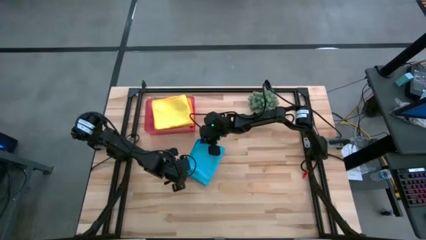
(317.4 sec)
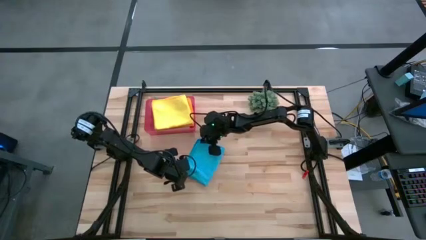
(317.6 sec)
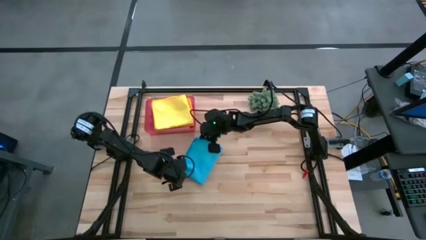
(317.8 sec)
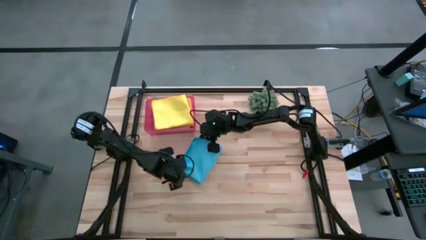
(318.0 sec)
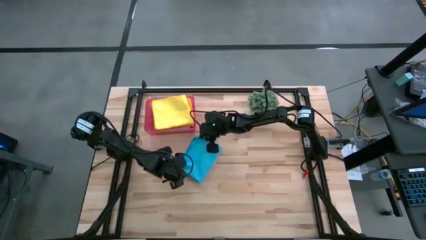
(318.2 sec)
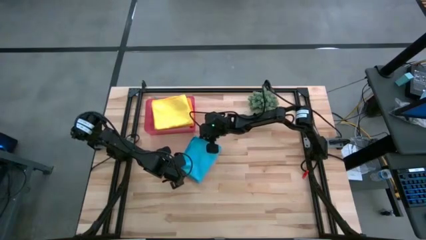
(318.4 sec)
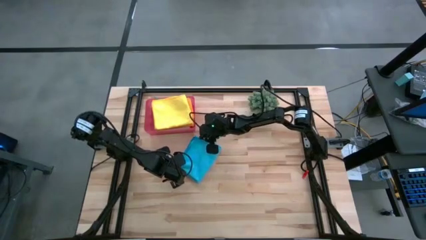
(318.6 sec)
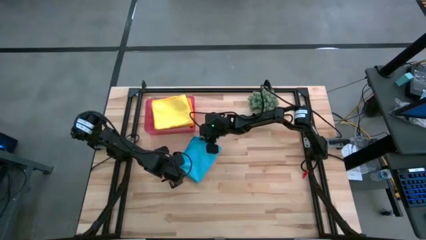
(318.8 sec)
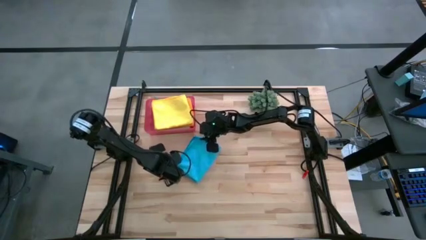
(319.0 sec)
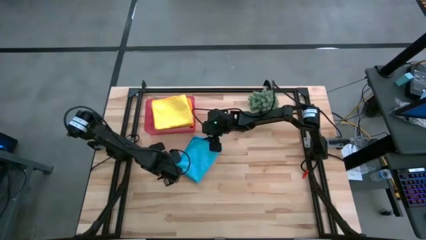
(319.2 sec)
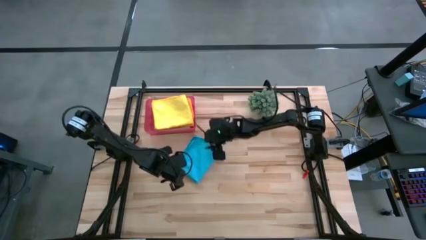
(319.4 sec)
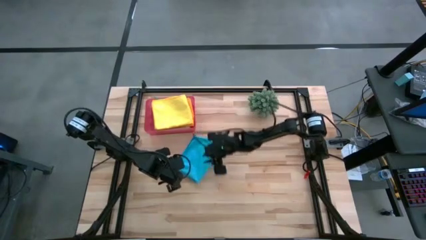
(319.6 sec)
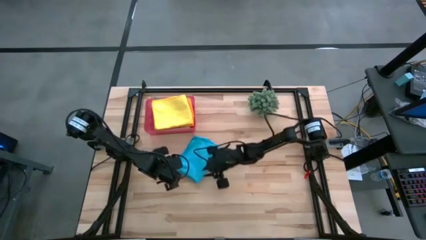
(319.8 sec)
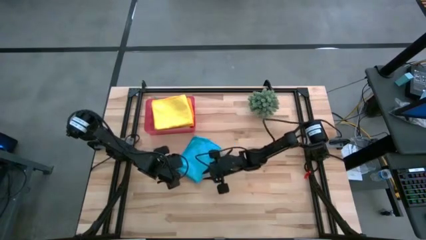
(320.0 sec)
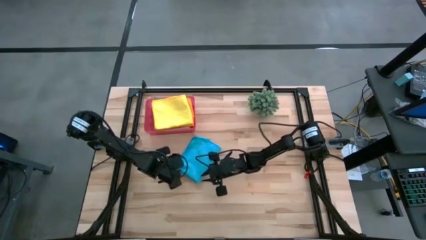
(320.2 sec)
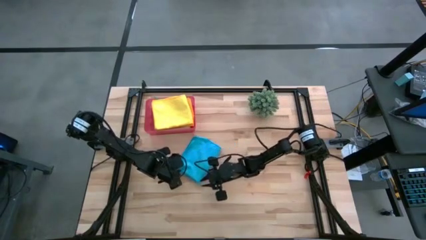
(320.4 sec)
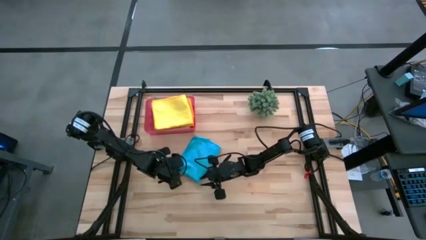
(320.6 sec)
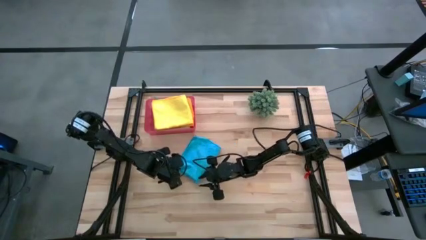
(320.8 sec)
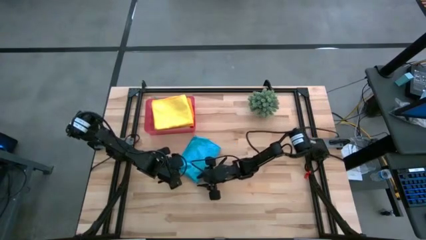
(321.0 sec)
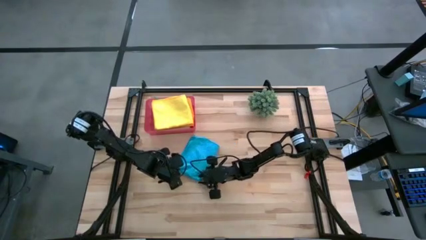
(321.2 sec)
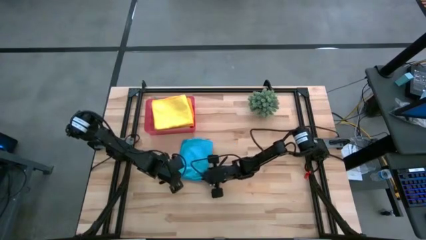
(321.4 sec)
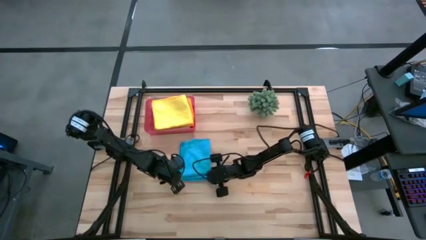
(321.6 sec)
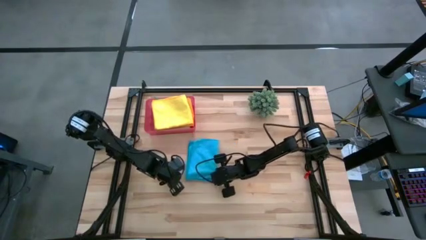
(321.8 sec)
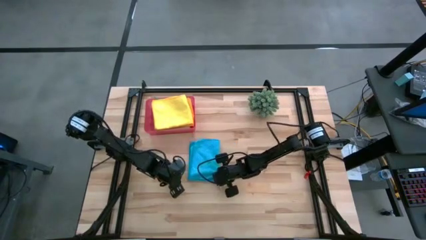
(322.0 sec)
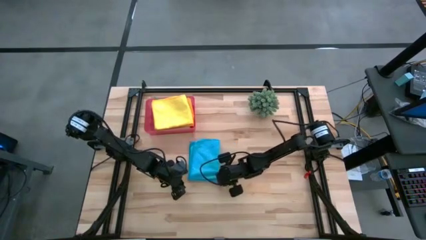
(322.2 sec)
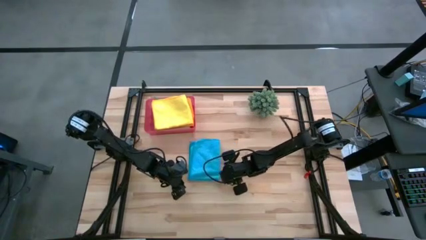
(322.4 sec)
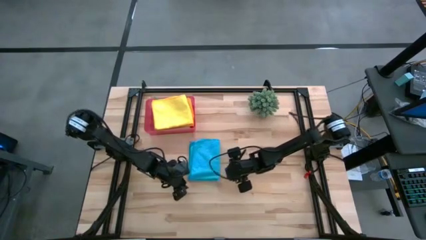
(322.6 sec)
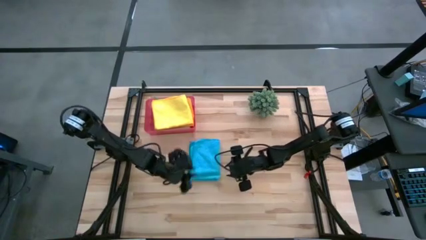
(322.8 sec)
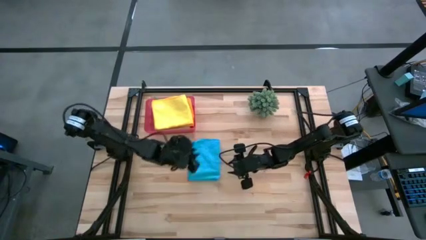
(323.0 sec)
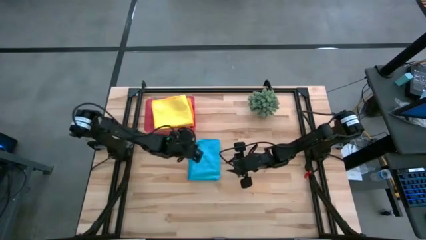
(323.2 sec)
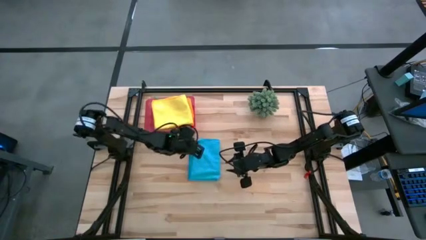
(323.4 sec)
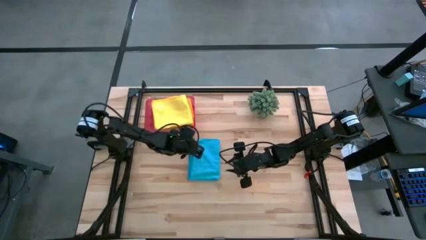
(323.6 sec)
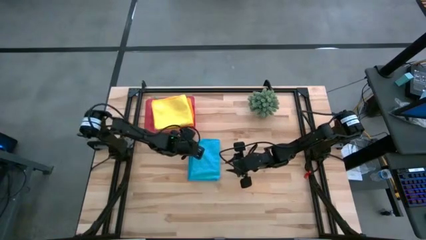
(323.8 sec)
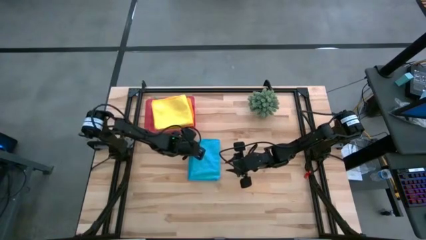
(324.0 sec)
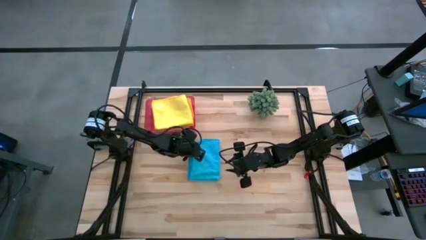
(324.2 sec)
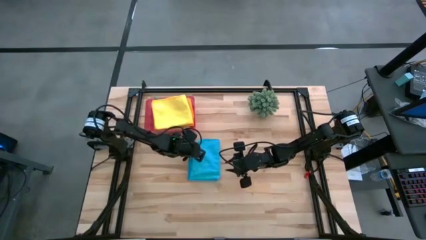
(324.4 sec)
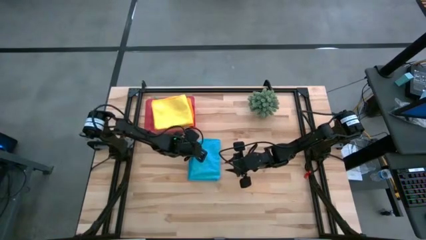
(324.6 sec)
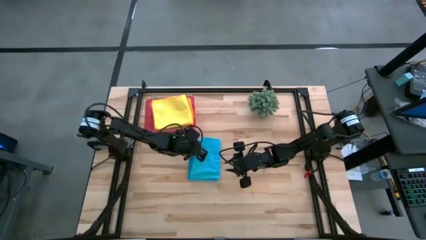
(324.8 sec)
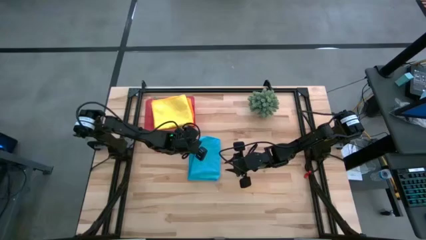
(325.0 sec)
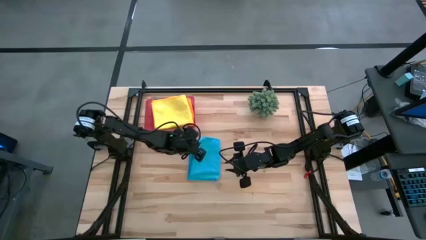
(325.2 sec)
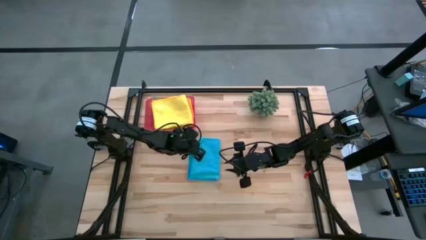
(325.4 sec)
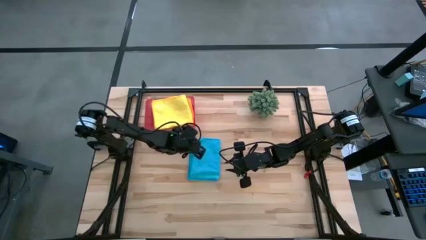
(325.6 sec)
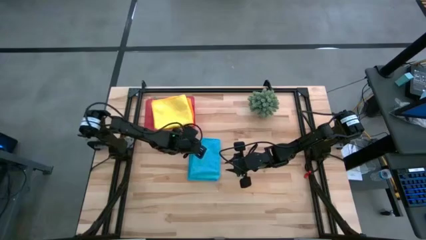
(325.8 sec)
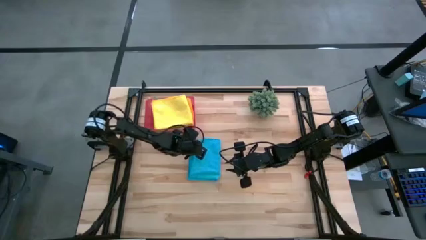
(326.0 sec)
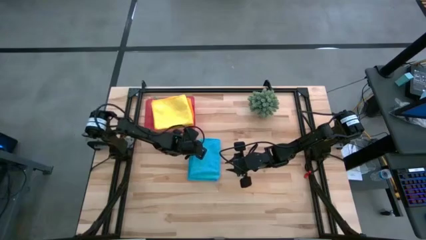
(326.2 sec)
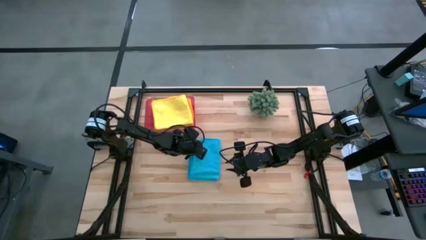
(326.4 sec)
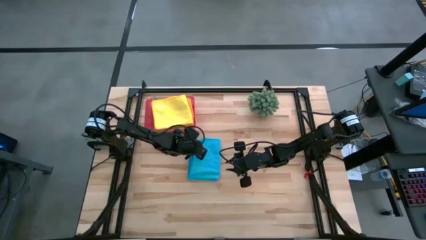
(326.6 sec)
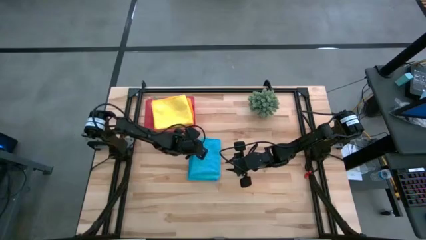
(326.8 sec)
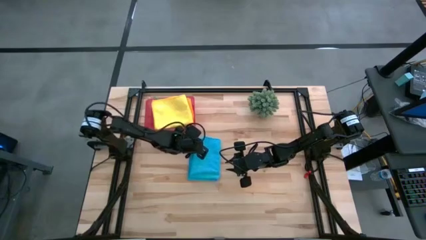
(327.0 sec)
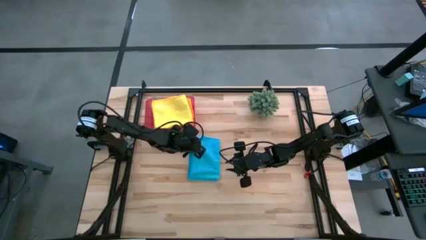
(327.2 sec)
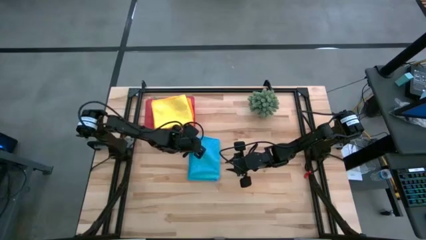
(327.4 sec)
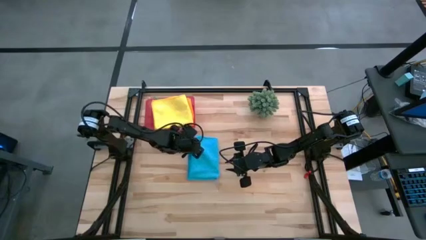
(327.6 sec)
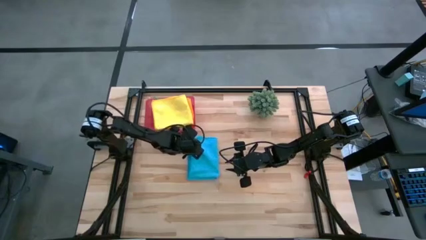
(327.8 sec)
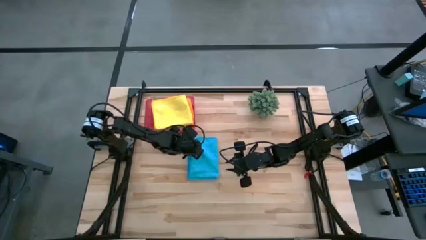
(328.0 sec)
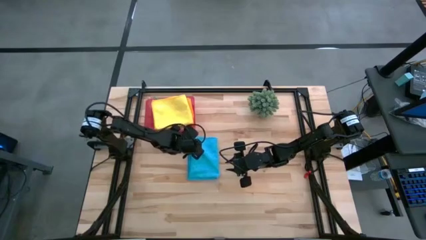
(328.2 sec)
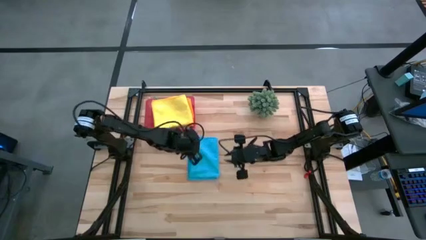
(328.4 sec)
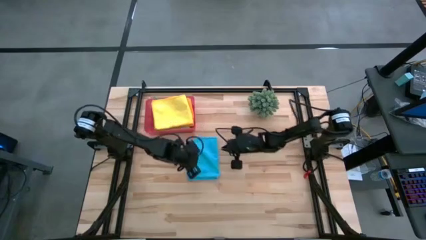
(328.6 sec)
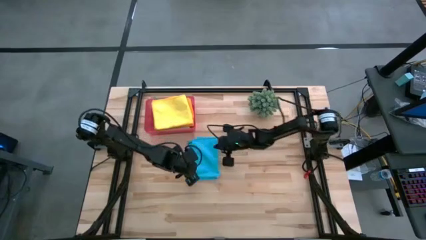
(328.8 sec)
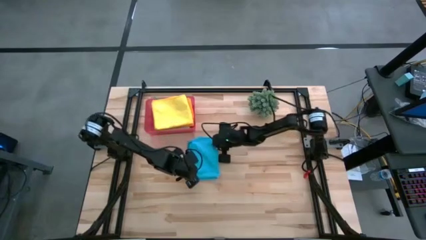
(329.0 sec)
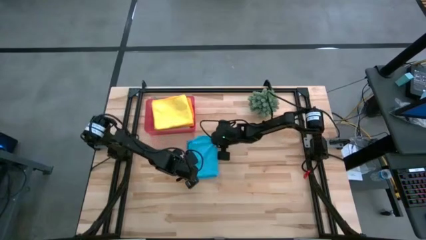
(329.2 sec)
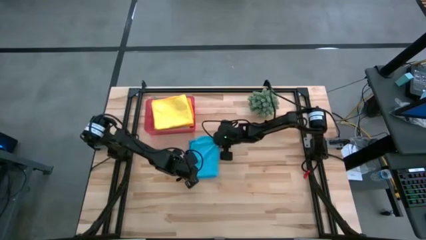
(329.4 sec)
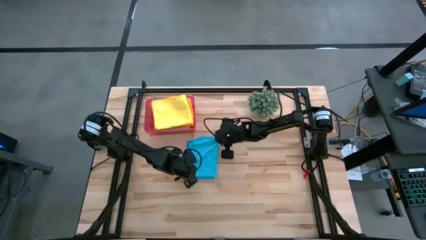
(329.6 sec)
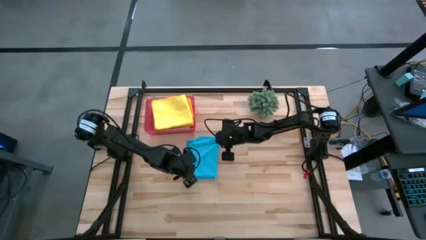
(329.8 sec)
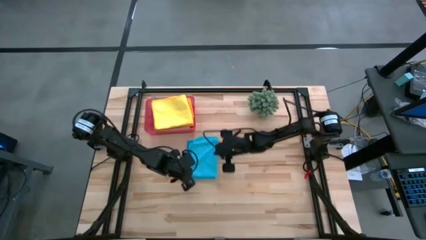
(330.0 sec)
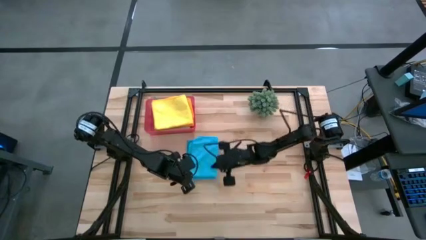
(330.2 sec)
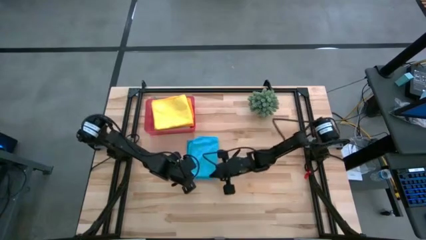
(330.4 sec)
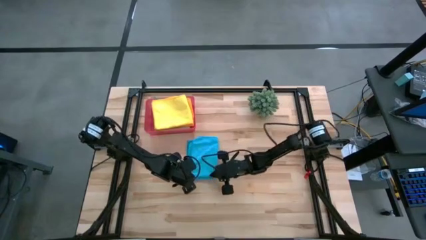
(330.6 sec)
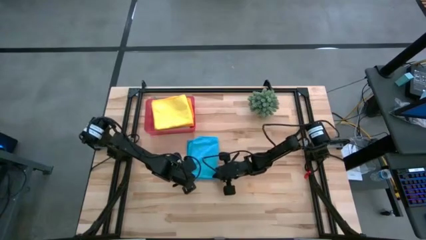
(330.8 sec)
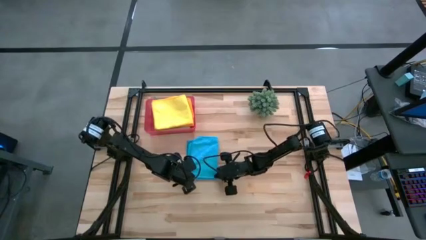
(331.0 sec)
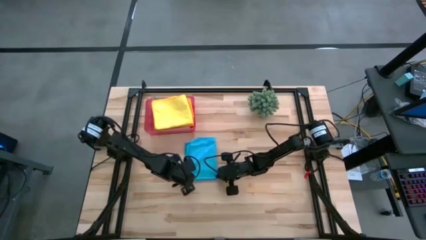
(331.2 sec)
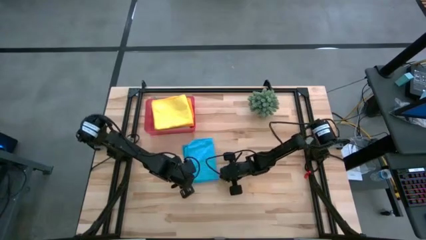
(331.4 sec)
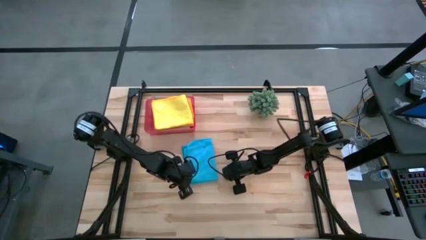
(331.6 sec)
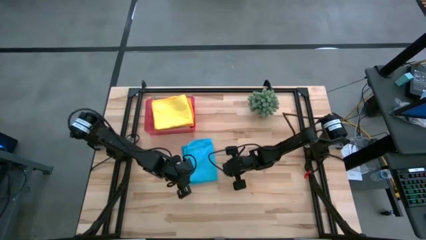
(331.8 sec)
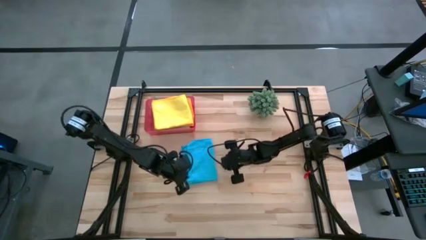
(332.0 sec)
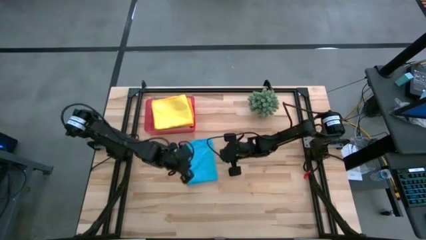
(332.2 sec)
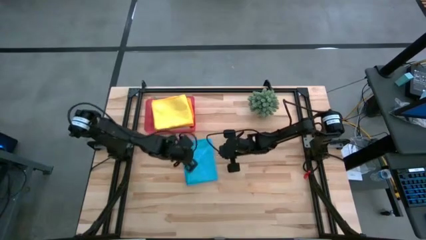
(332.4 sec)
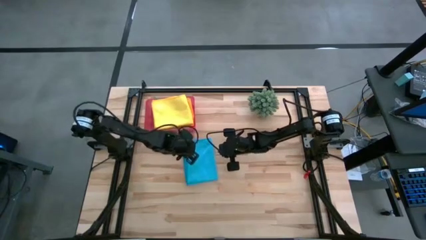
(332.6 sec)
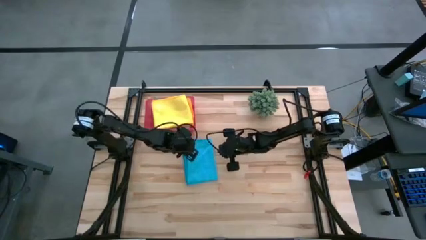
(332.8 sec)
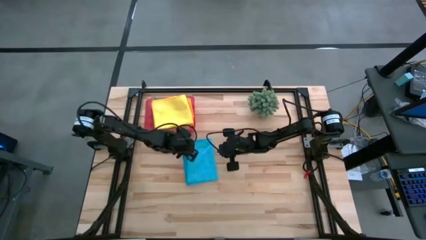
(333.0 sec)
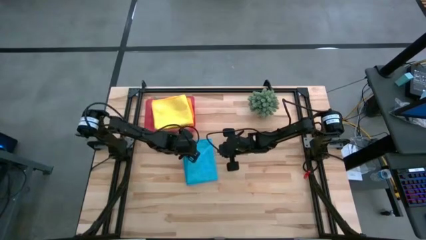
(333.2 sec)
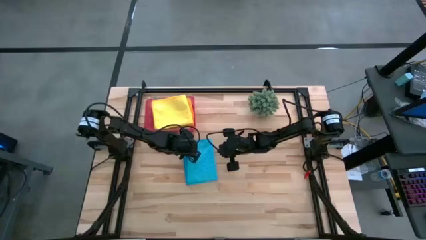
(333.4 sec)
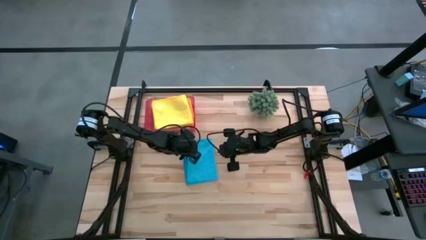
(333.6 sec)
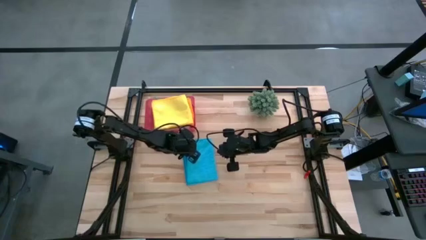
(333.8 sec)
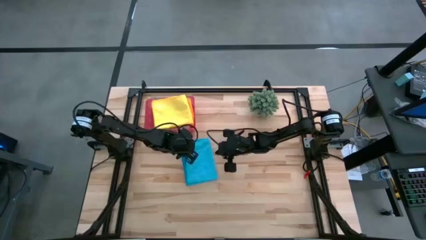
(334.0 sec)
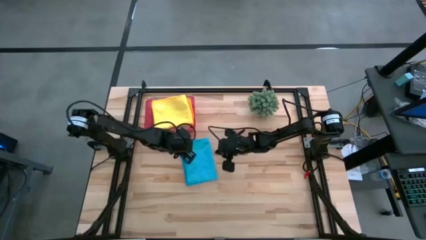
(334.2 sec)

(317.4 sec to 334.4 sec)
Task: Fold microfiber towels
Fold the blue towel
